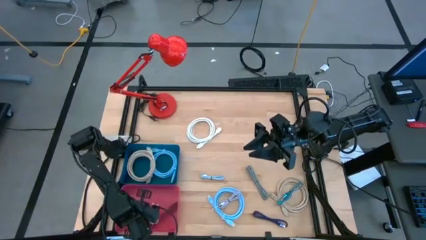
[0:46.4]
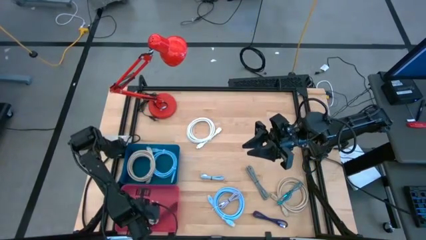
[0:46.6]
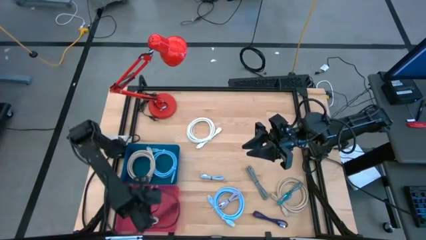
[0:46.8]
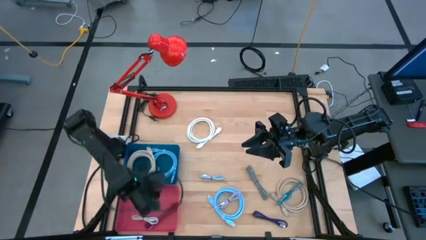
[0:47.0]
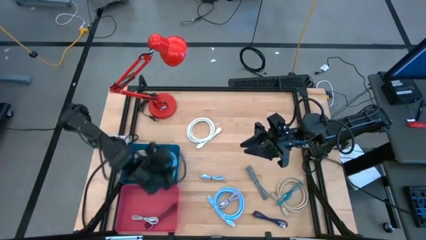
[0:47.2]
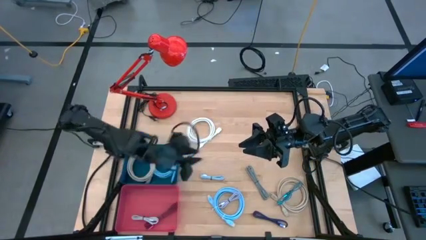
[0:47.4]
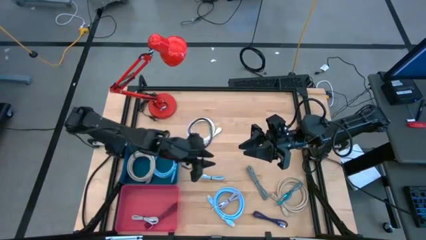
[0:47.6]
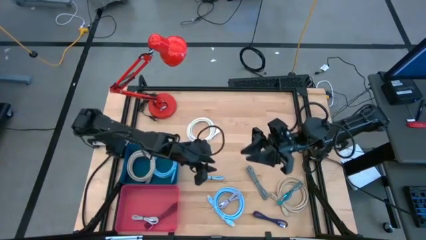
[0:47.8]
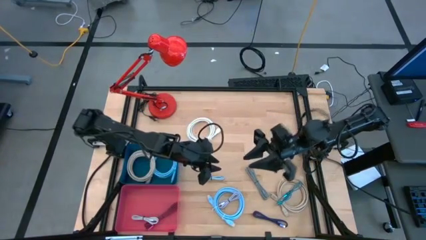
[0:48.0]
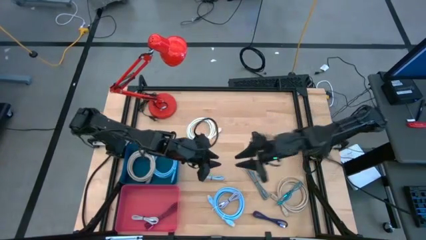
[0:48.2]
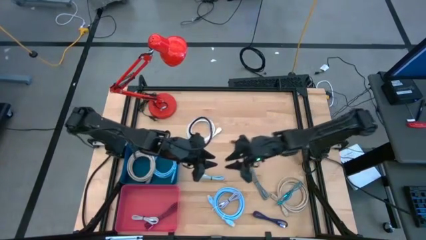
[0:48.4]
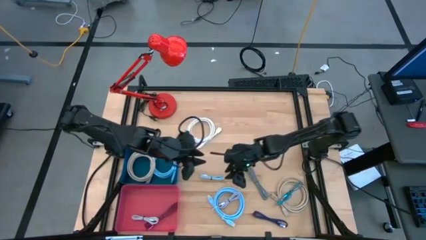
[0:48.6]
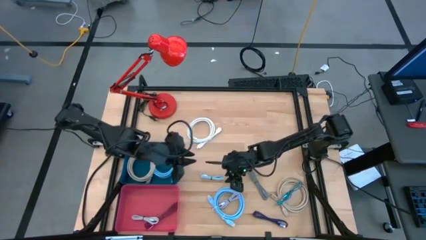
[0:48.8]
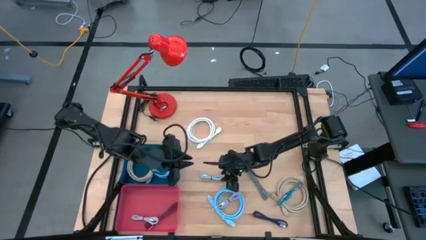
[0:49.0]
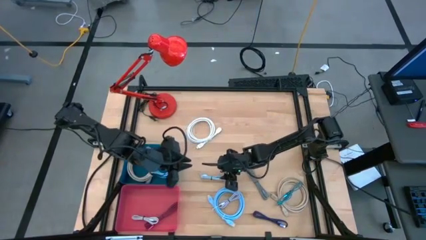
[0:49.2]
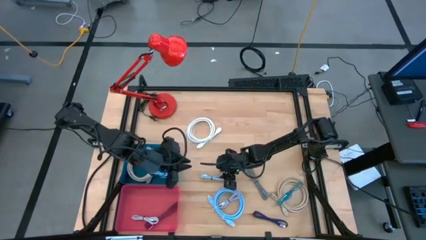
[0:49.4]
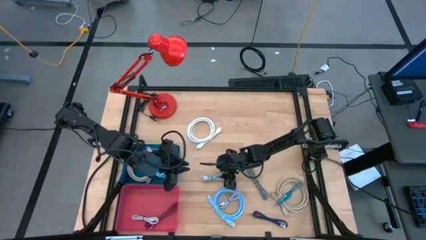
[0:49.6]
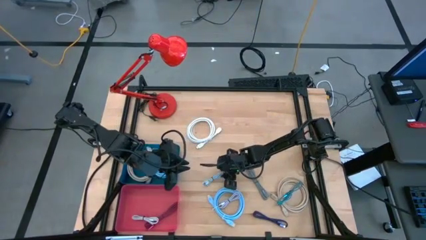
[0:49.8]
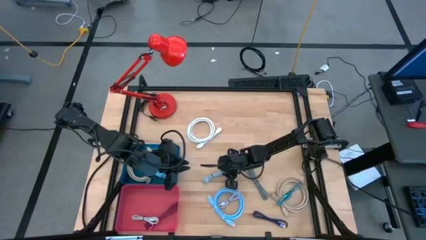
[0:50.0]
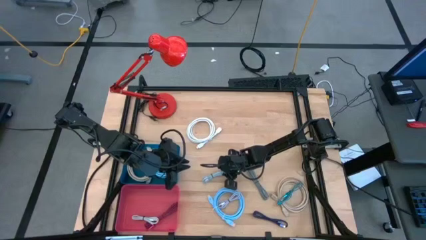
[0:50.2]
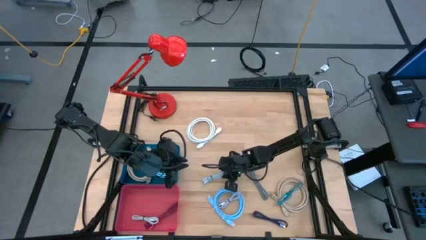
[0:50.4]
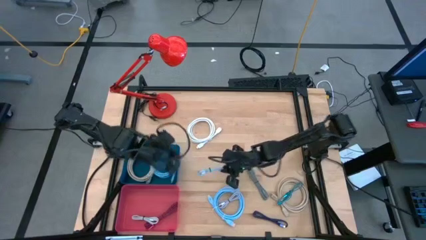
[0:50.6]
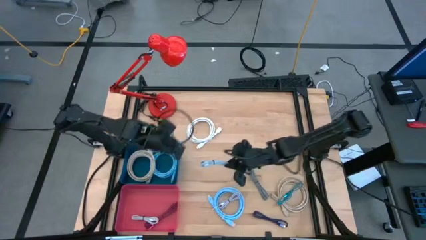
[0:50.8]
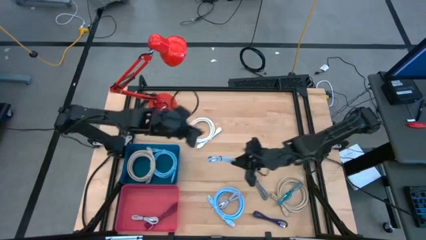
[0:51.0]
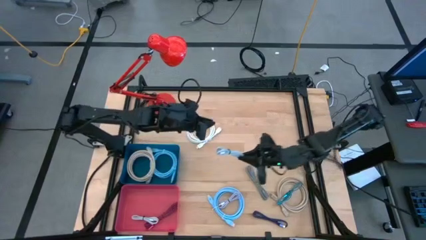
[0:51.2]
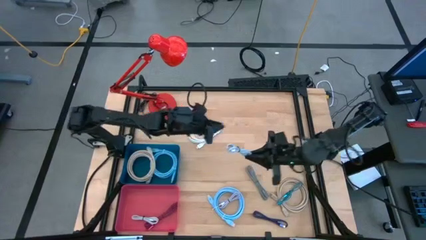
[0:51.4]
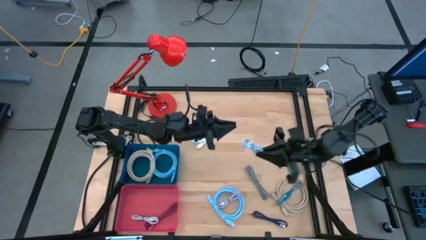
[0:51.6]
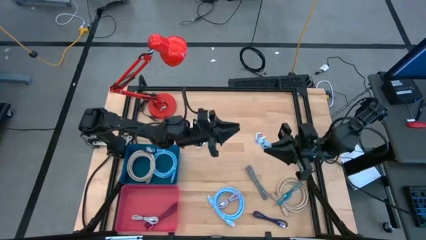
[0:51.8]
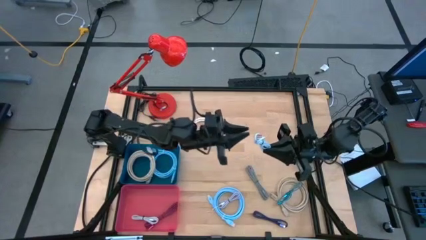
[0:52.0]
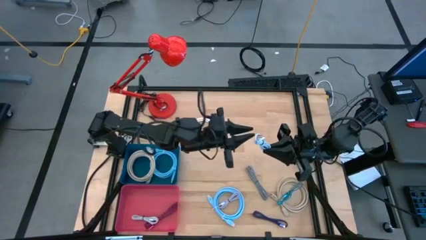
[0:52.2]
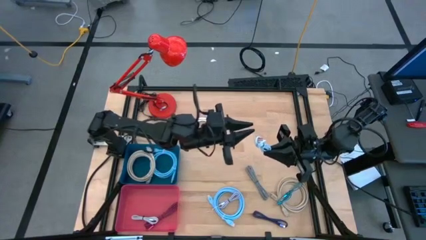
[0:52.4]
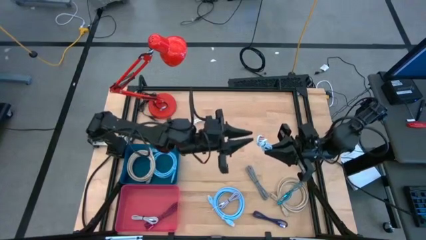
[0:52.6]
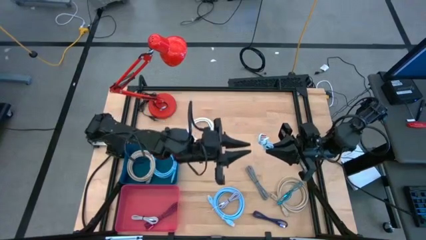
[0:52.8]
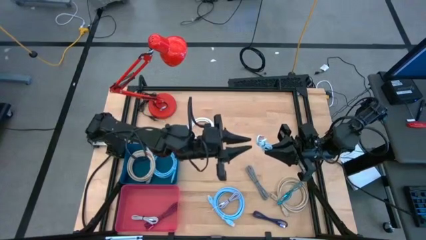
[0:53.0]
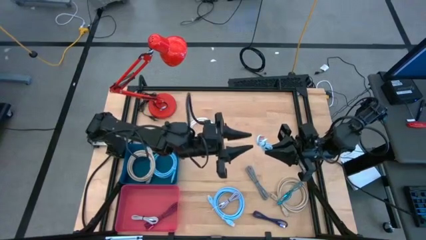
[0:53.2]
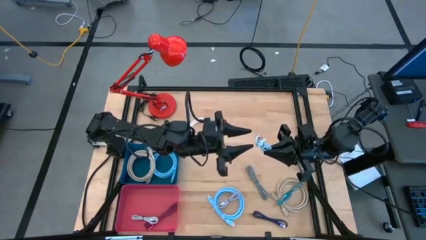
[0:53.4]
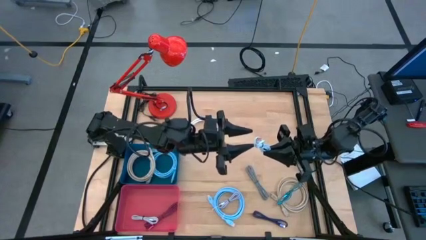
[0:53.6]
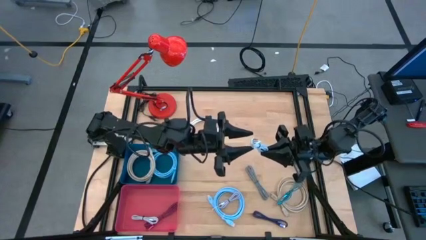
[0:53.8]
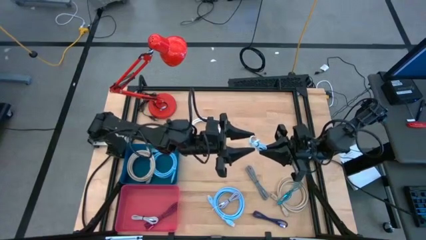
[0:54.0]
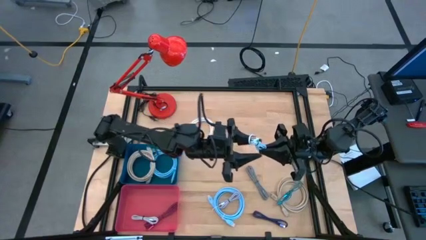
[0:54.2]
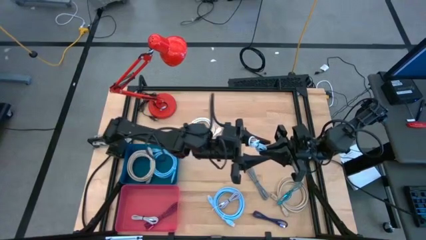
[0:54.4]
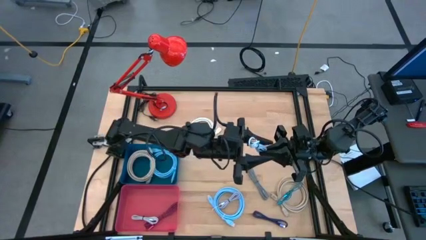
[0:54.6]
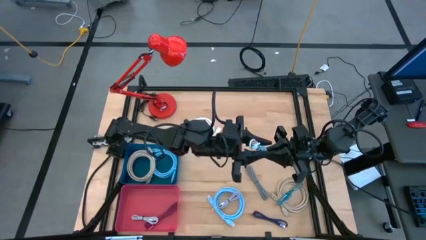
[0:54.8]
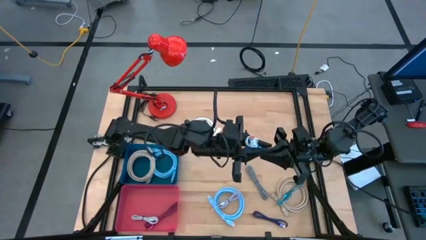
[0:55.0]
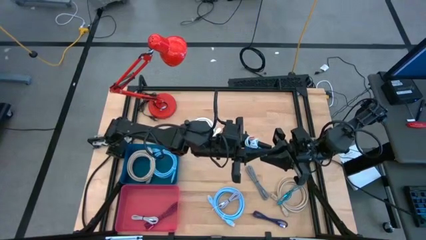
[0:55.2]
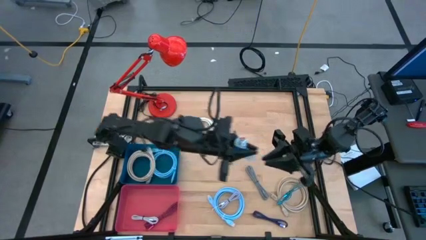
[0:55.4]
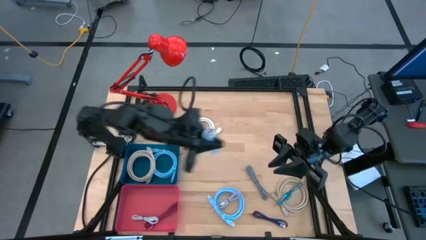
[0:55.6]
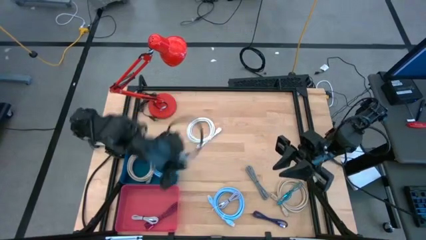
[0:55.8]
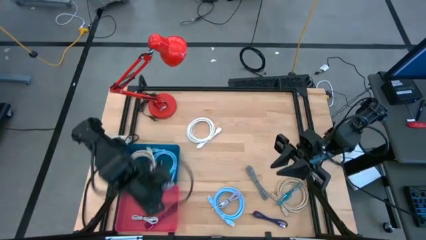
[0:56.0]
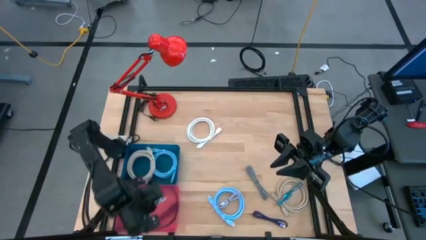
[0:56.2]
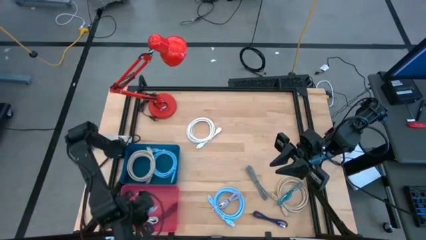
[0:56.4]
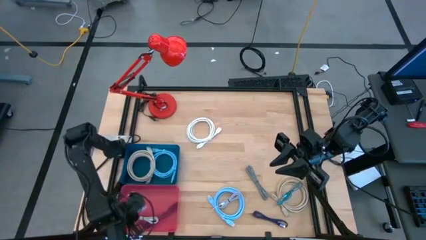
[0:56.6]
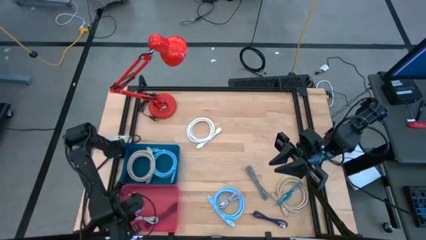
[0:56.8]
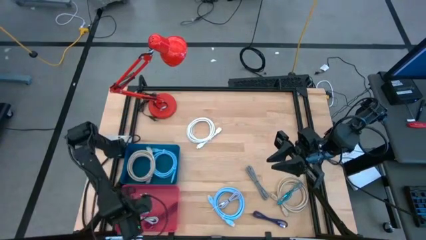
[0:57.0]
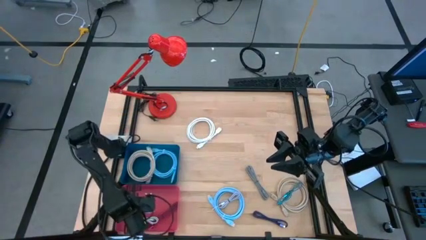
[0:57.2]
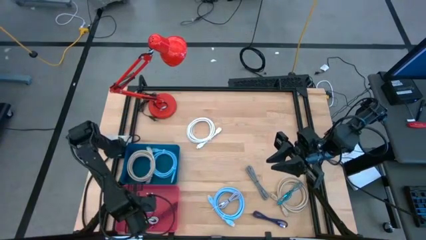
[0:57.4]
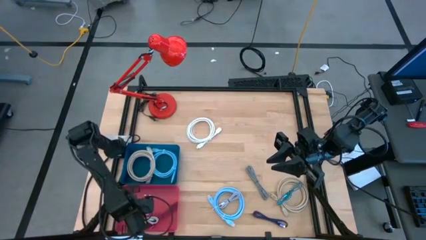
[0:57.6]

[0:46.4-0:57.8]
Task: Pick & Place USB Port
Put the light blue USB cable into the red bin
